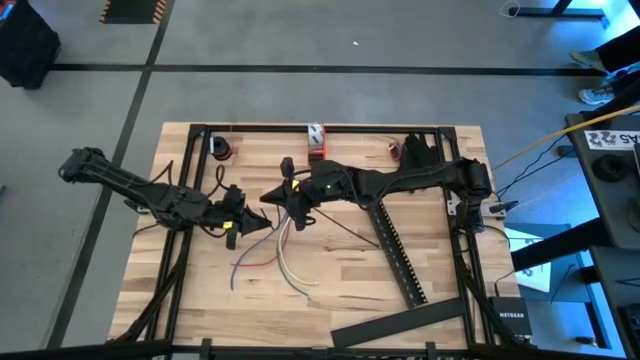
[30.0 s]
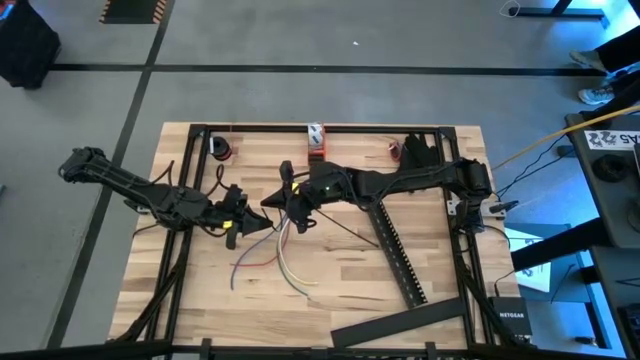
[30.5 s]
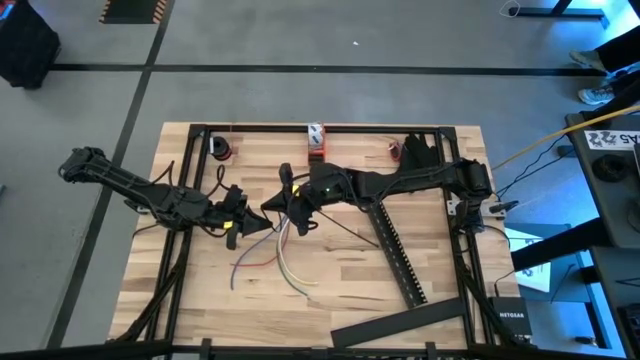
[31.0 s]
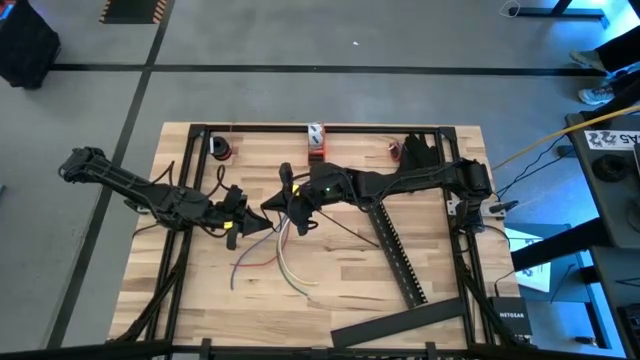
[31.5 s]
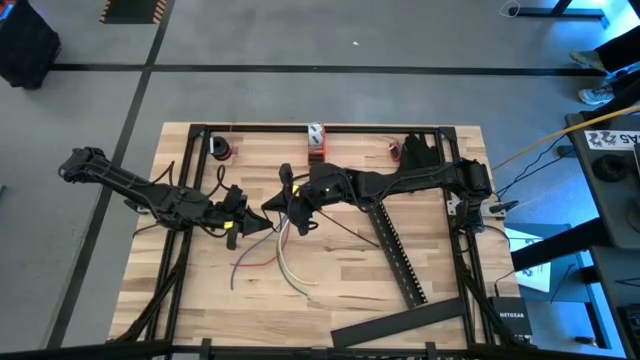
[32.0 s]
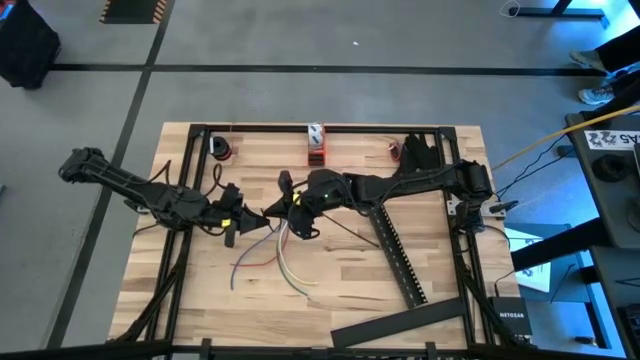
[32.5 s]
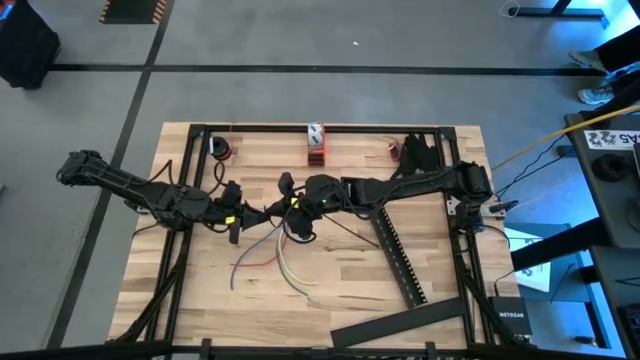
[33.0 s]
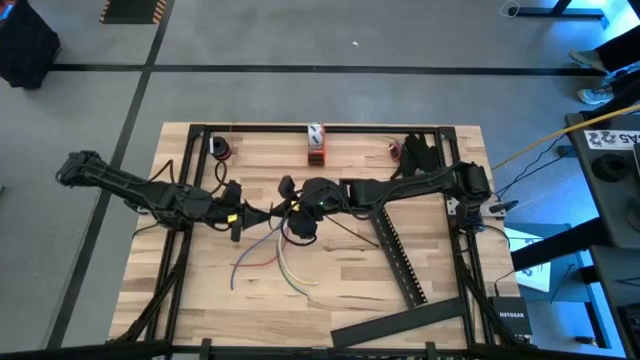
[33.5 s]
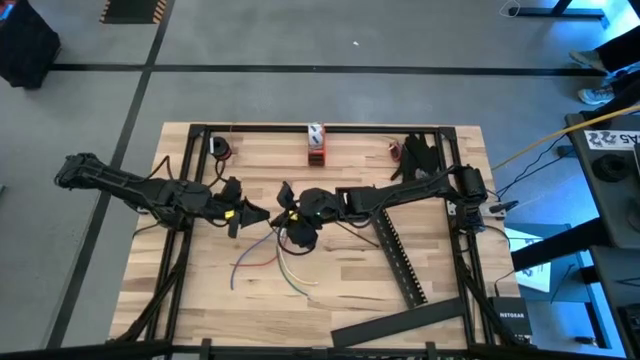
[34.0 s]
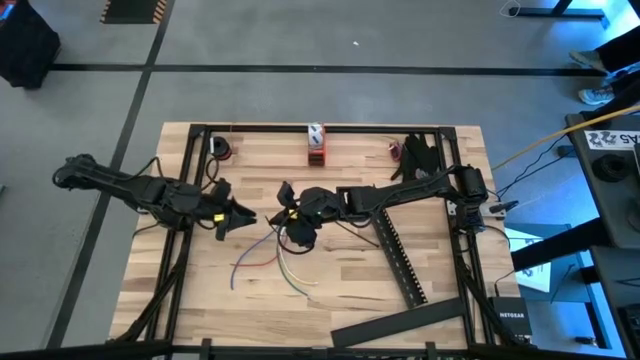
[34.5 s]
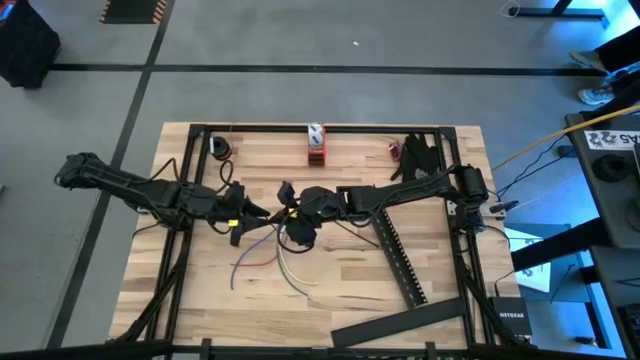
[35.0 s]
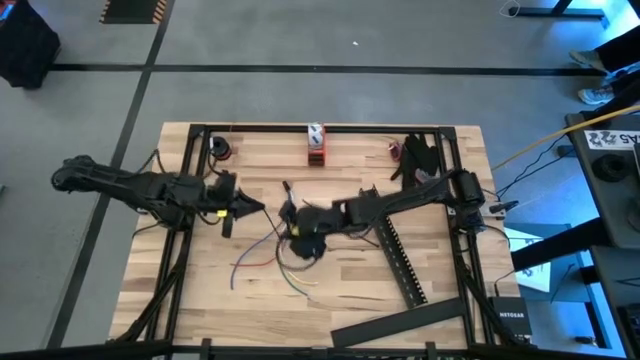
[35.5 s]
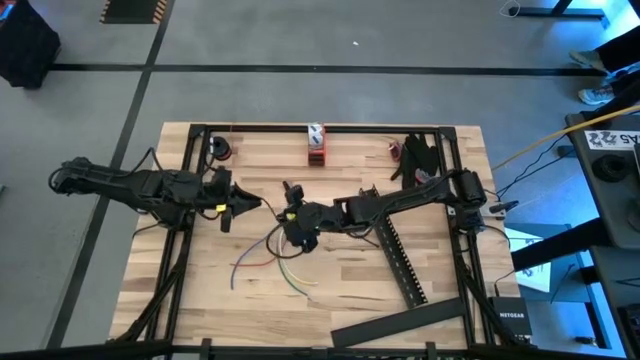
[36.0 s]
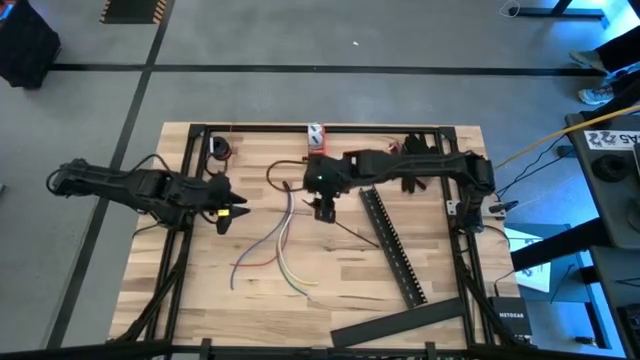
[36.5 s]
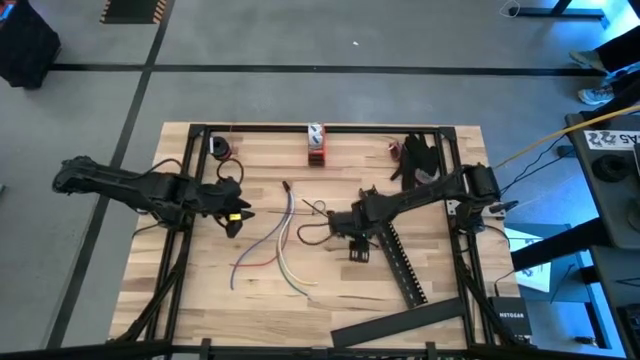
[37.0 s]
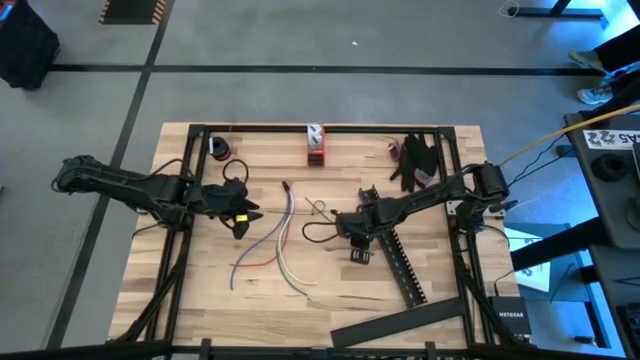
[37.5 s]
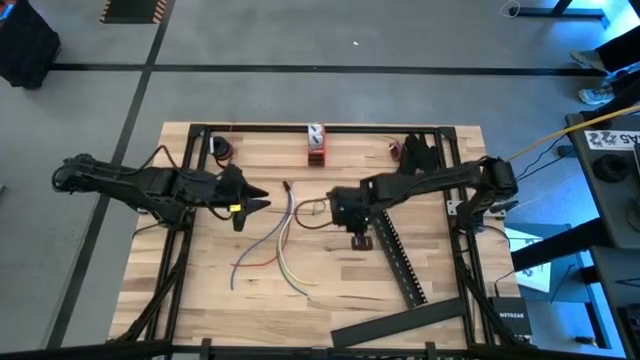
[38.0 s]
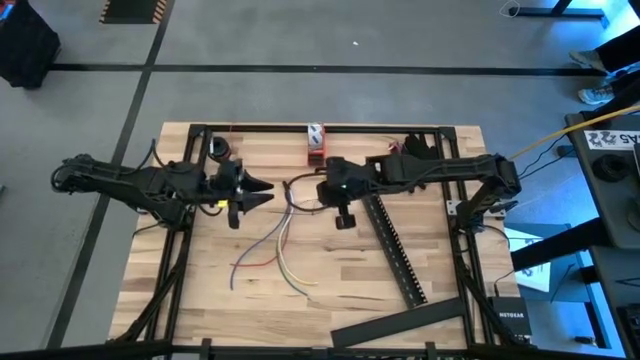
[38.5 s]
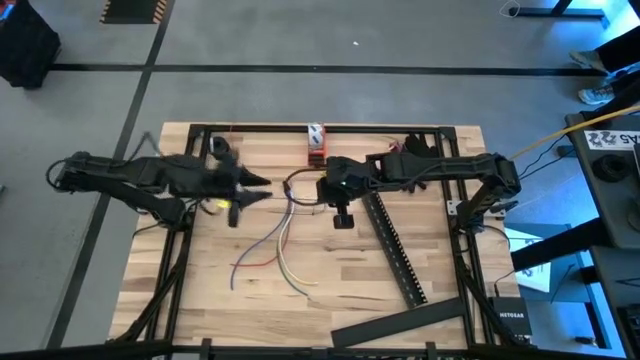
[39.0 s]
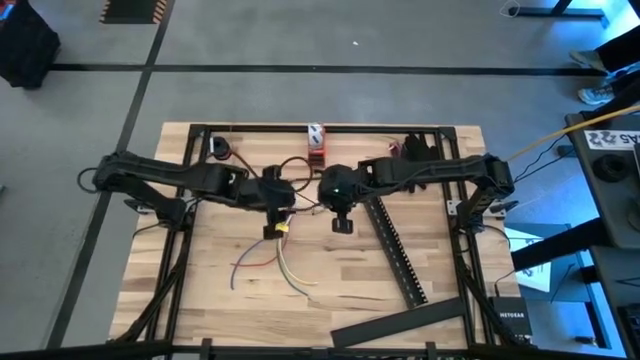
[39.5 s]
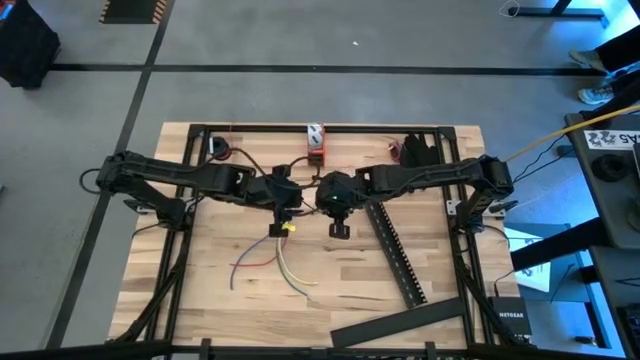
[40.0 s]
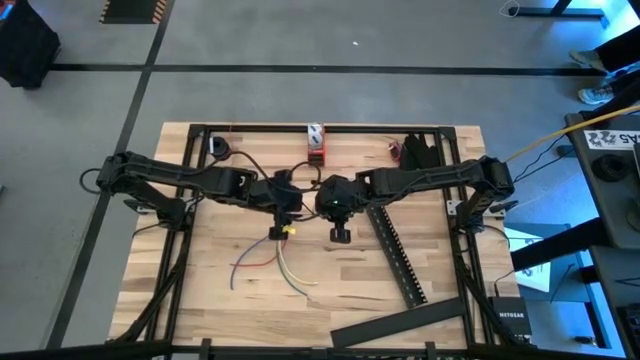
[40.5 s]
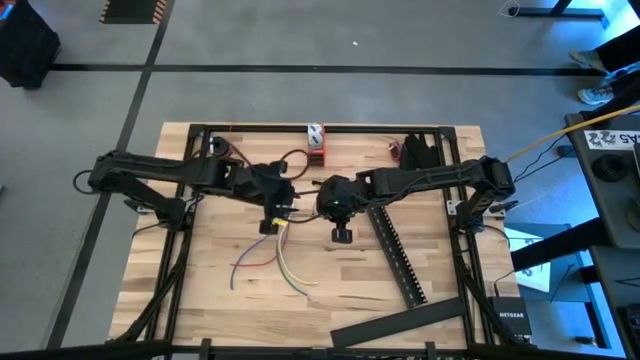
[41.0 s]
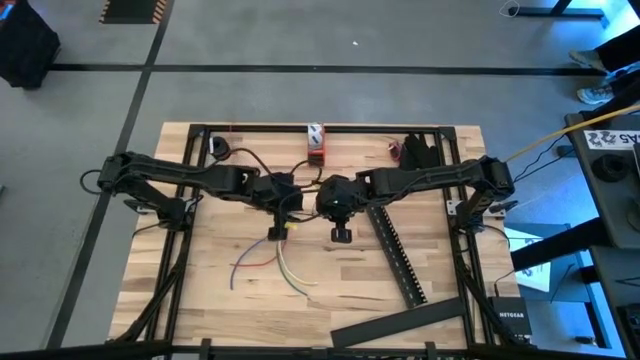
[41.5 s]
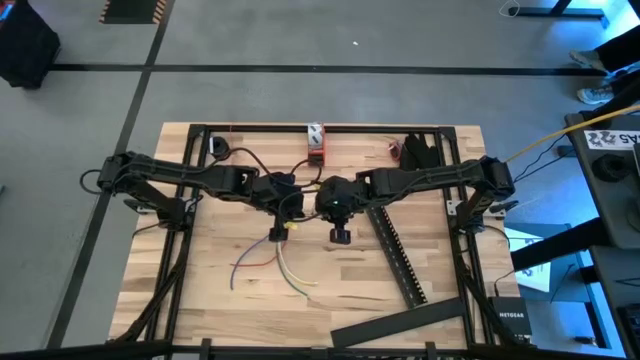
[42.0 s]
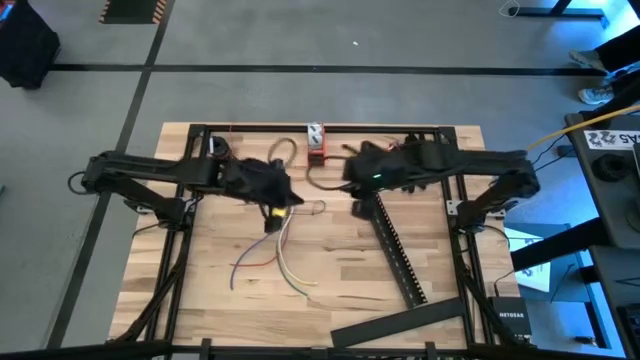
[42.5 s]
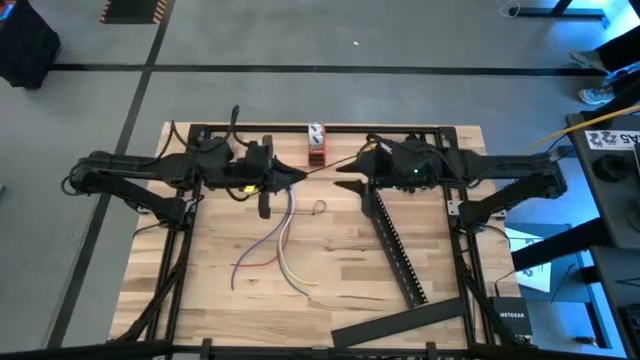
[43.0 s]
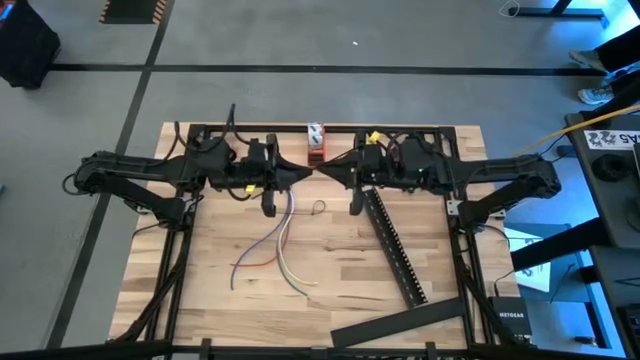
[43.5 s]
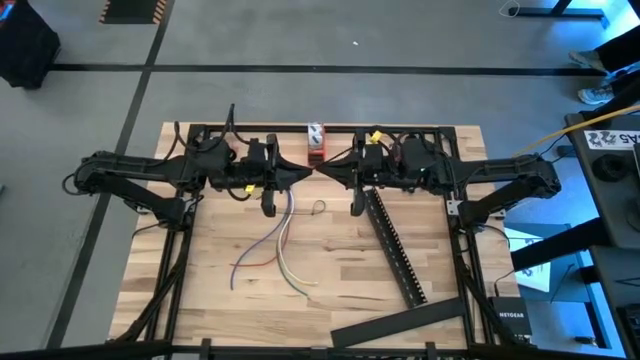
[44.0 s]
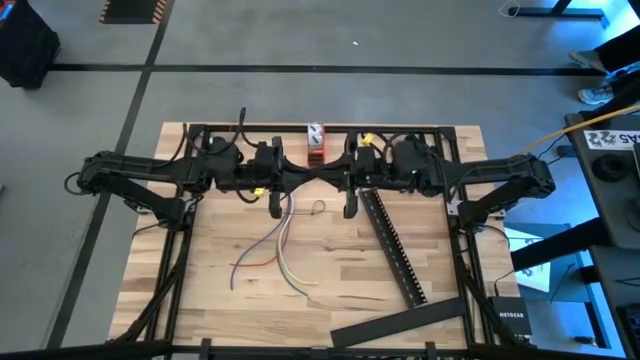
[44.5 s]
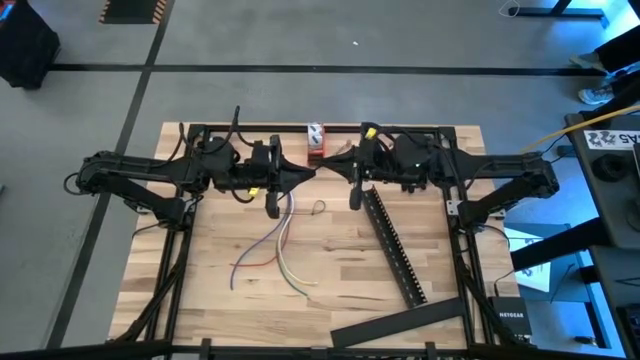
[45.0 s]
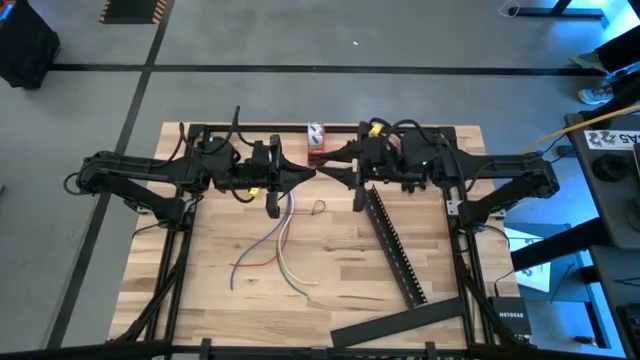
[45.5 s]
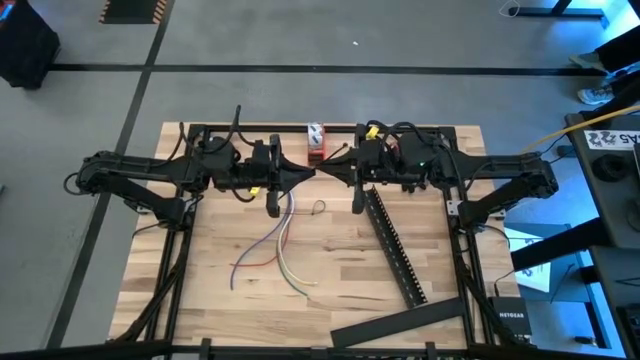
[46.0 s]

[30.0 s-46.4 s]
Task: Ziptie cables
Wrap the black zip tie on the cable

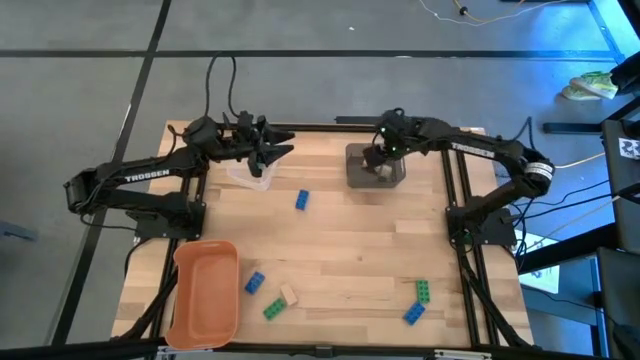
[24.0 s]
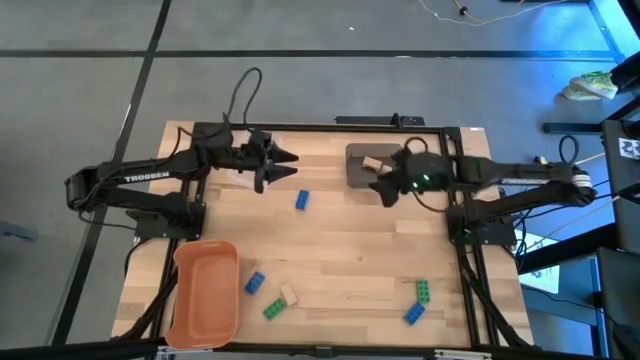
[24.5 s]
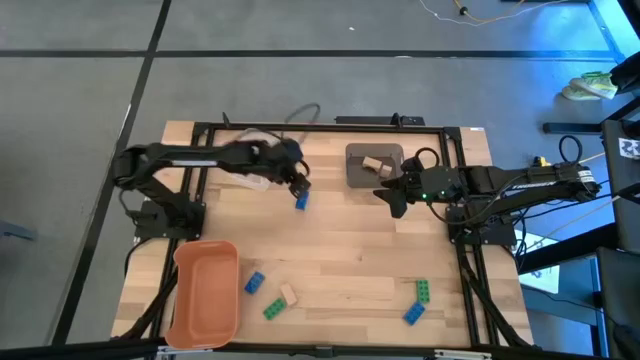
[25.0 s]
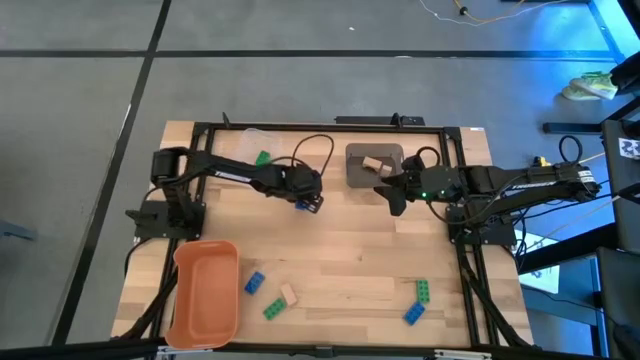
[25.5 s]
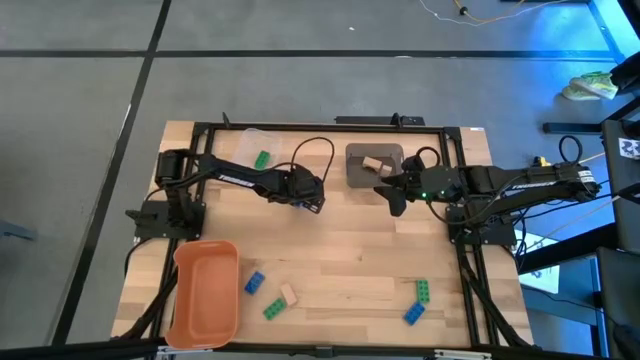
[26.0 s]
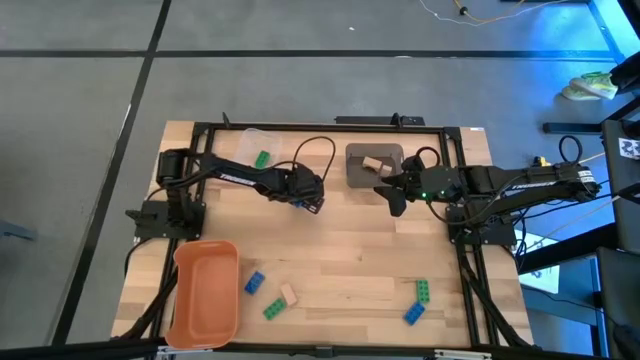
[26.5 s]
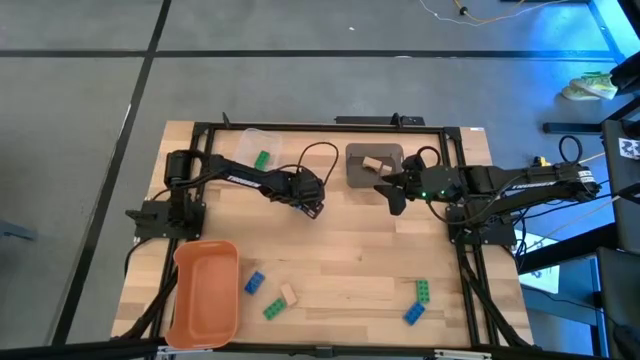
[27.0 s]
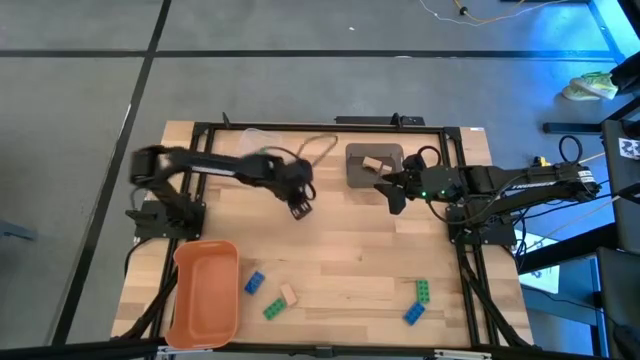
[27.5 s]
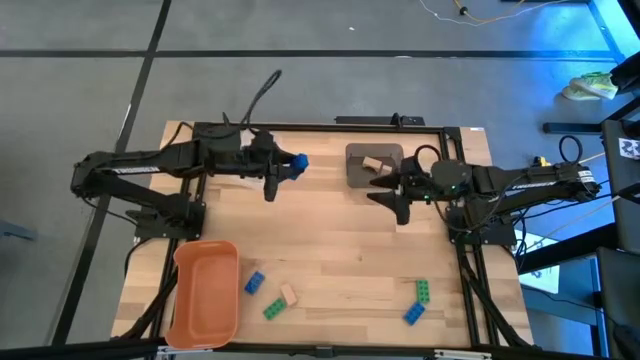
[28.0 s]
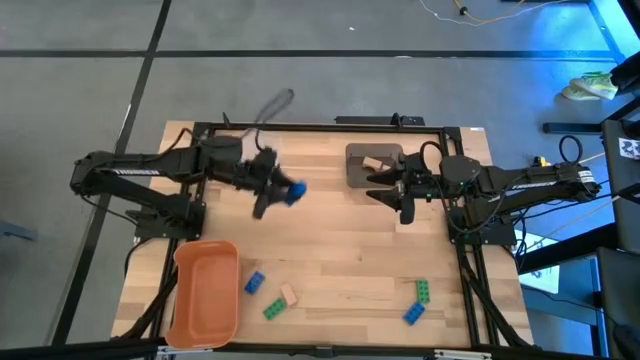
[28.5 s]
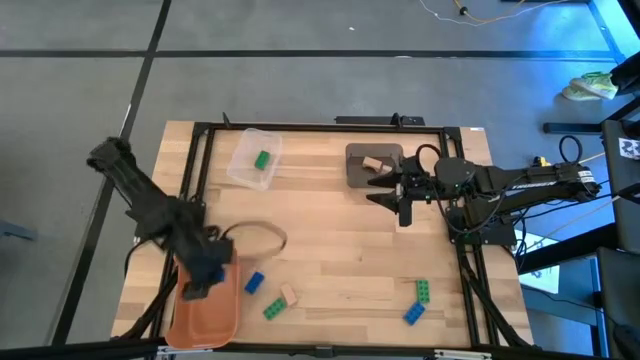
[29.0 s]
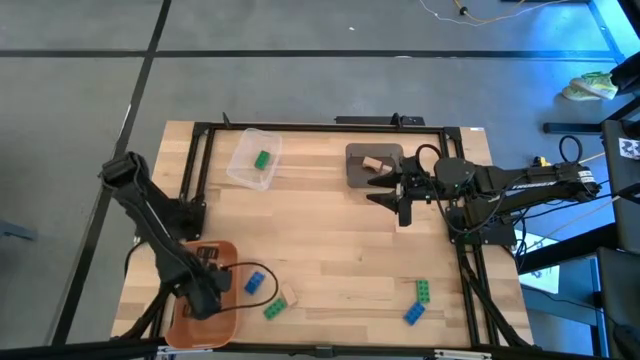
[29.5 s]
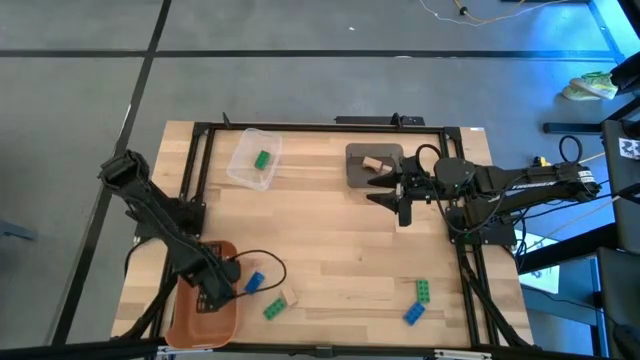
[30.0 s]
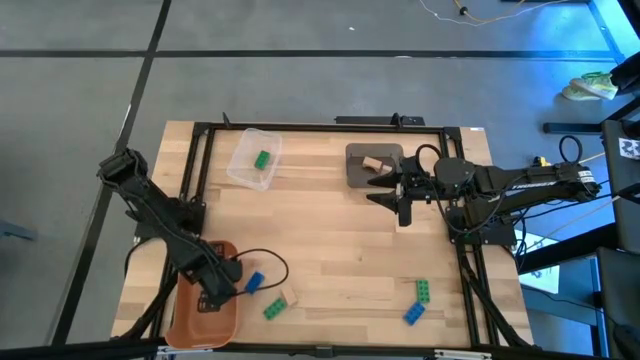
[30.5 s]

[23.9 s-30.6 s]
Task: Sort & place blocks by color
Put the top blue game piece into the orange bin
